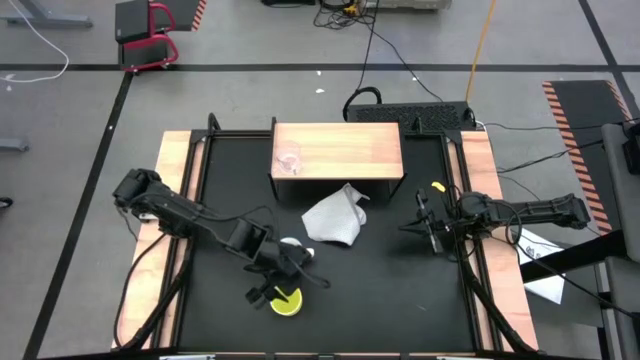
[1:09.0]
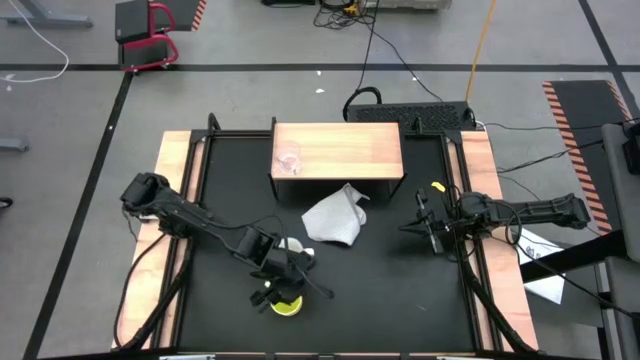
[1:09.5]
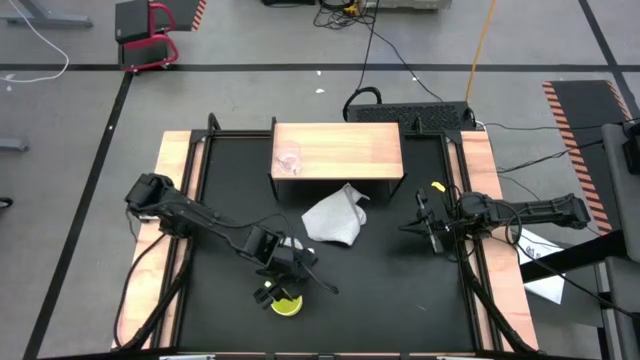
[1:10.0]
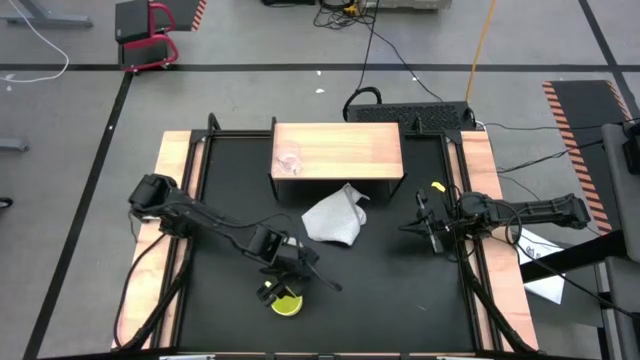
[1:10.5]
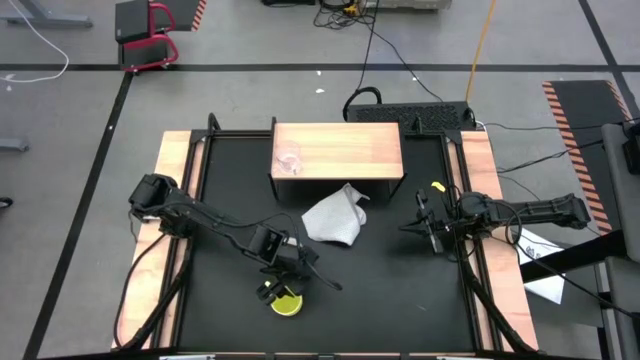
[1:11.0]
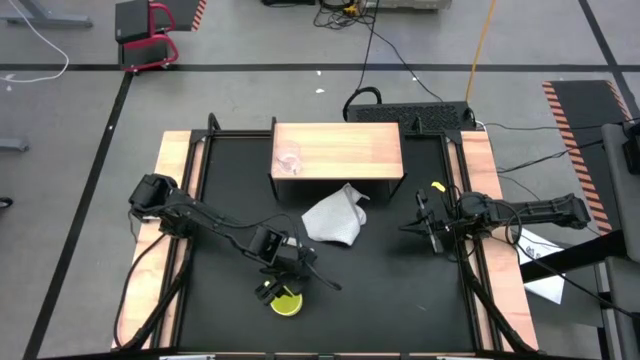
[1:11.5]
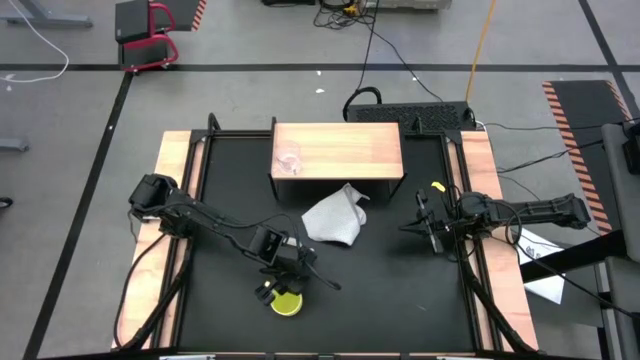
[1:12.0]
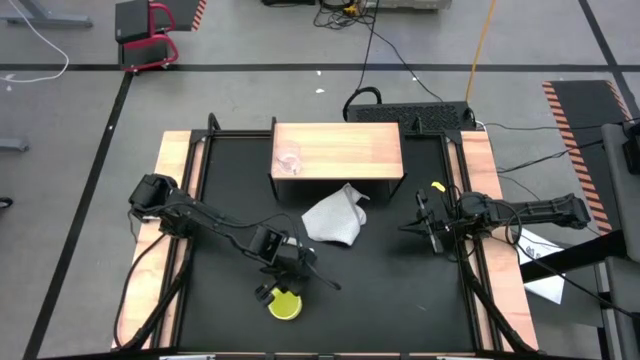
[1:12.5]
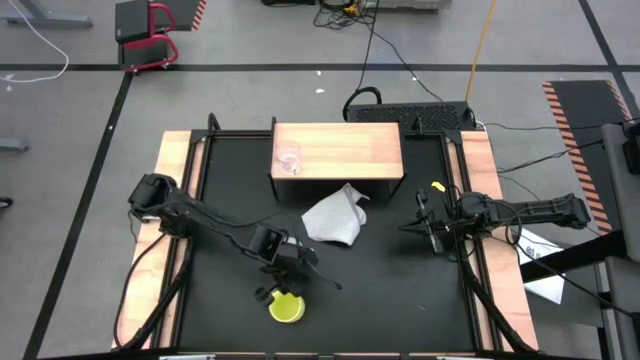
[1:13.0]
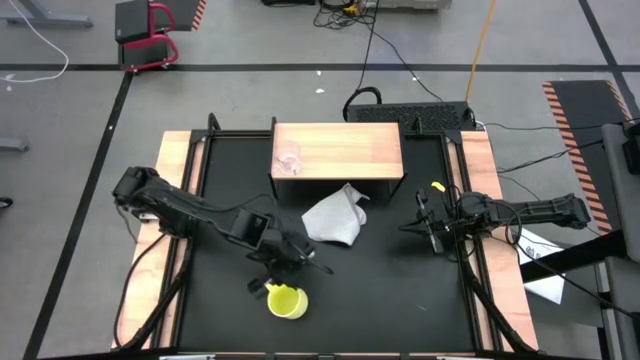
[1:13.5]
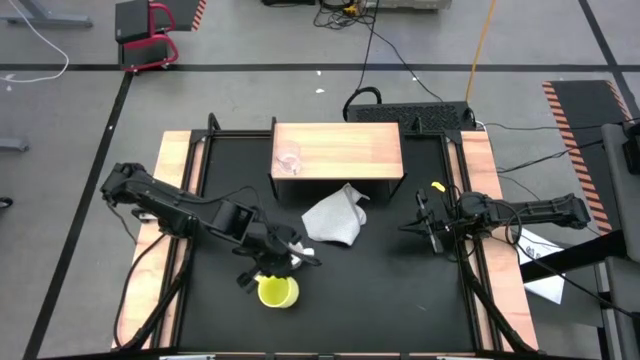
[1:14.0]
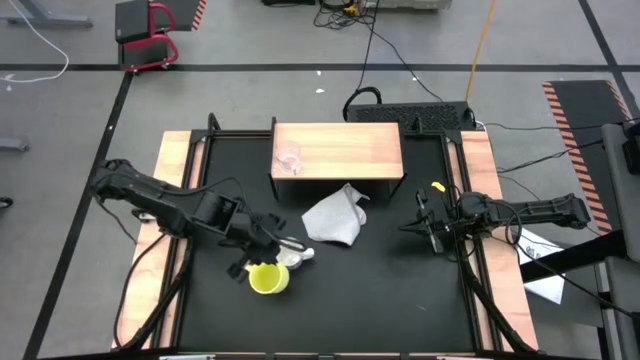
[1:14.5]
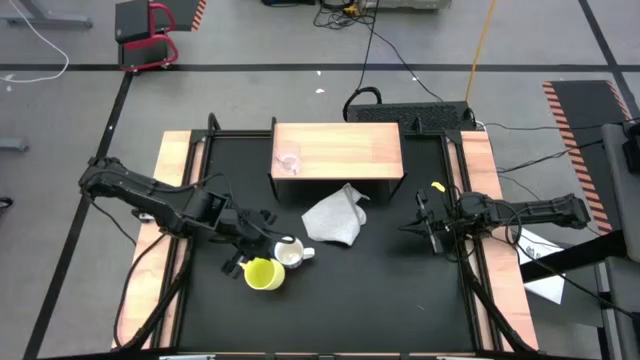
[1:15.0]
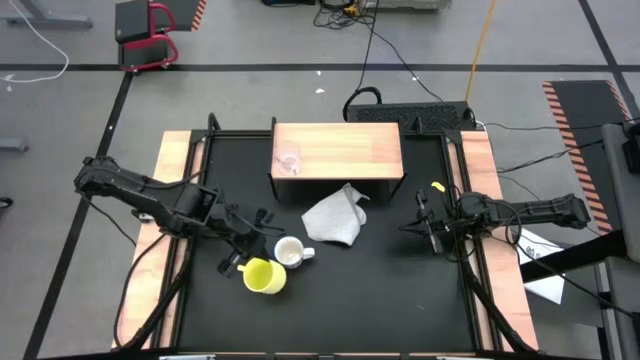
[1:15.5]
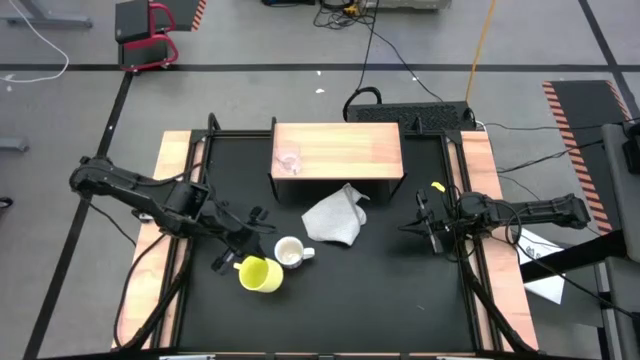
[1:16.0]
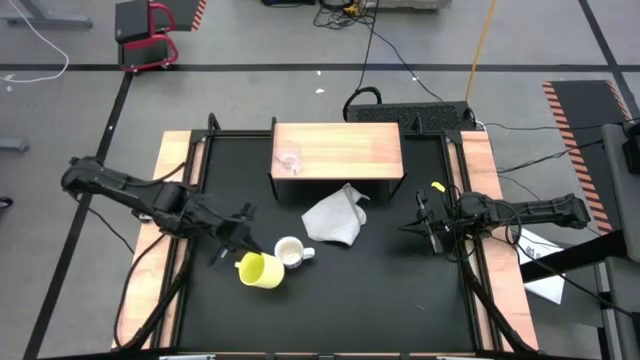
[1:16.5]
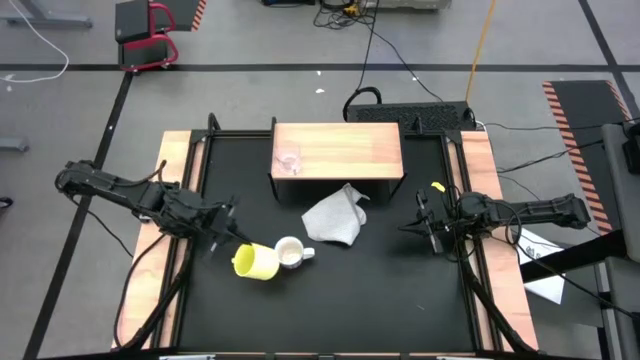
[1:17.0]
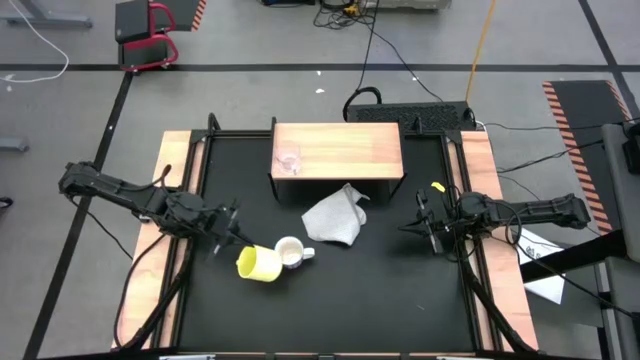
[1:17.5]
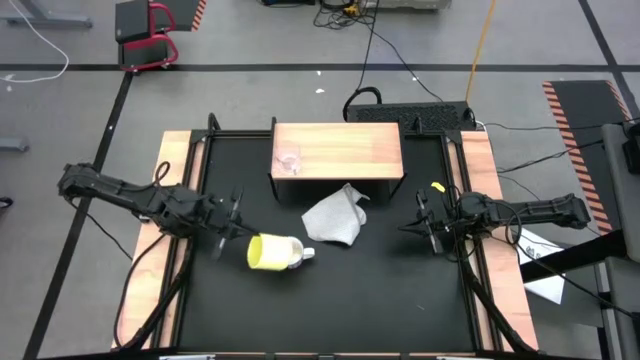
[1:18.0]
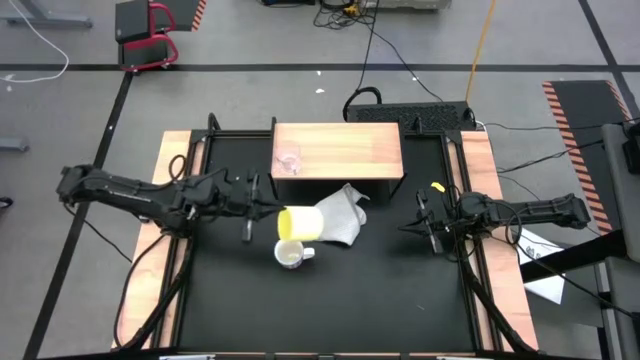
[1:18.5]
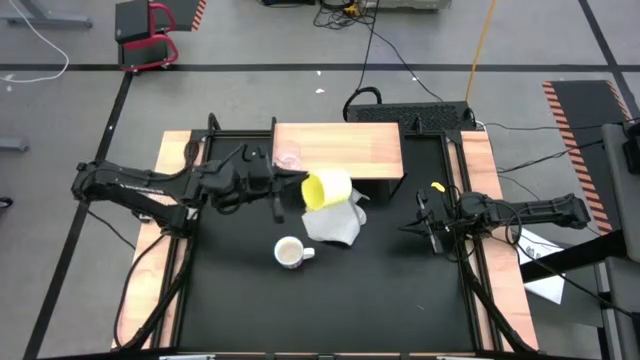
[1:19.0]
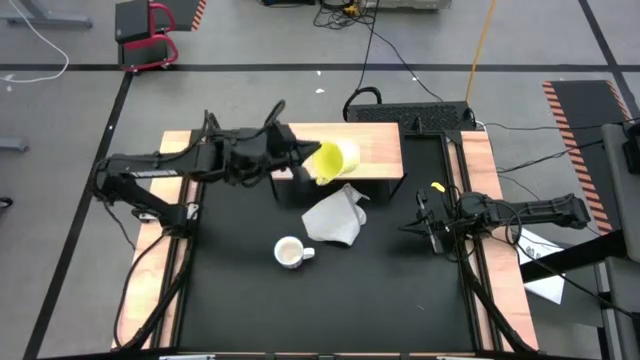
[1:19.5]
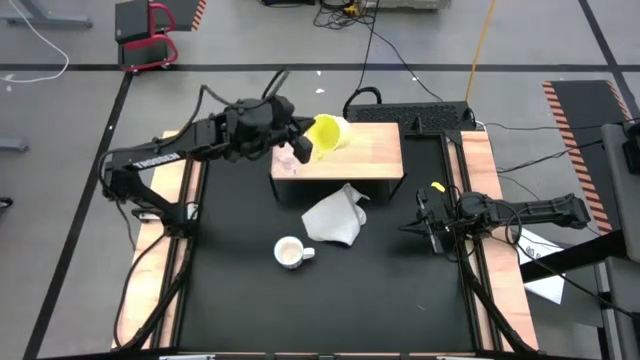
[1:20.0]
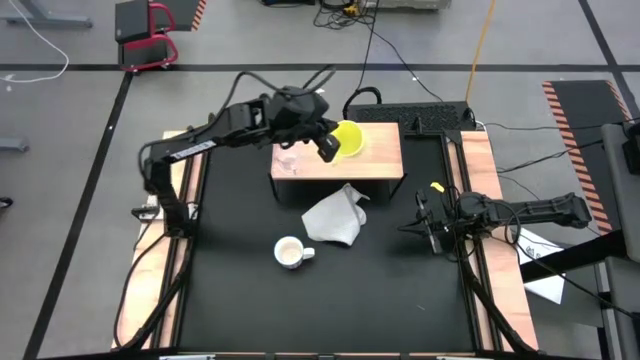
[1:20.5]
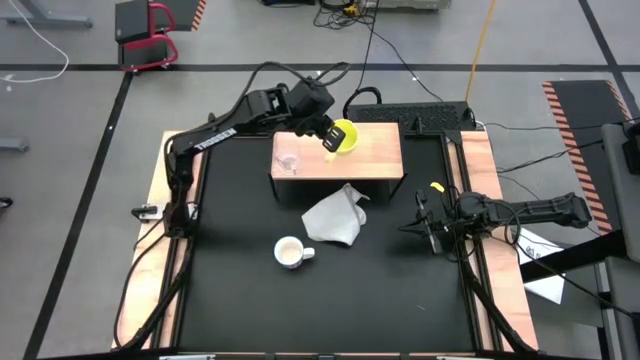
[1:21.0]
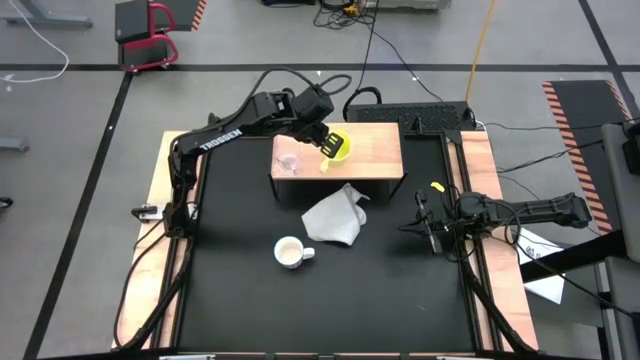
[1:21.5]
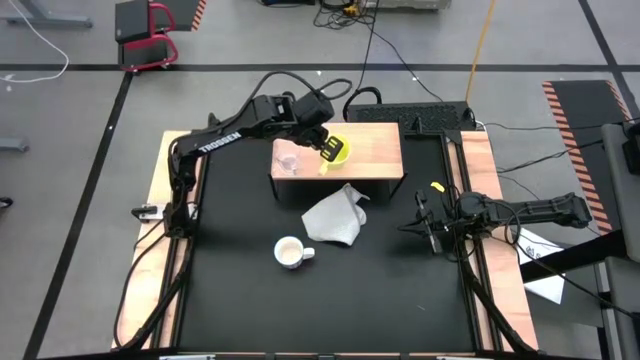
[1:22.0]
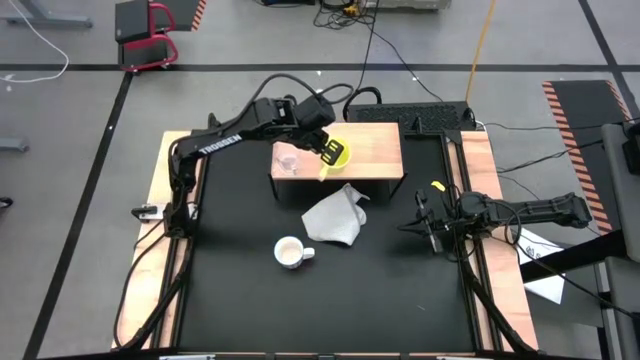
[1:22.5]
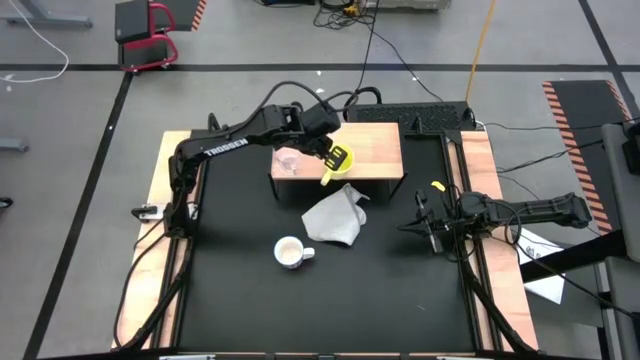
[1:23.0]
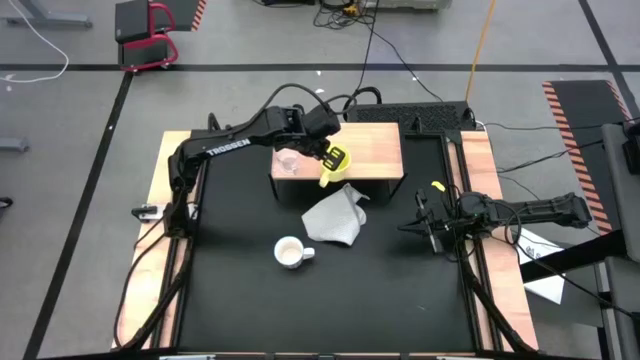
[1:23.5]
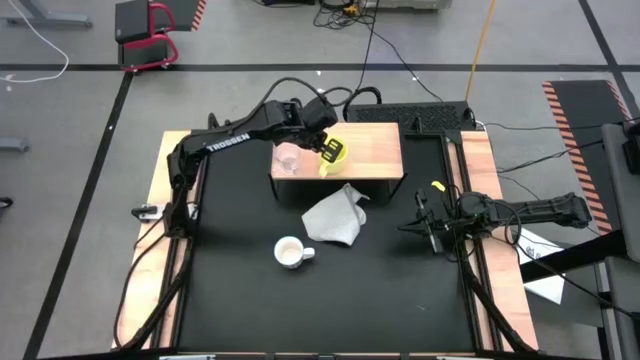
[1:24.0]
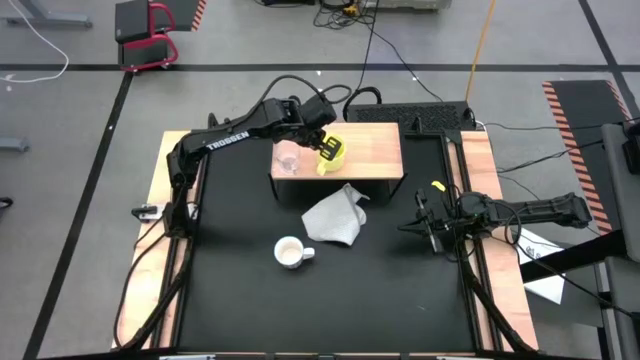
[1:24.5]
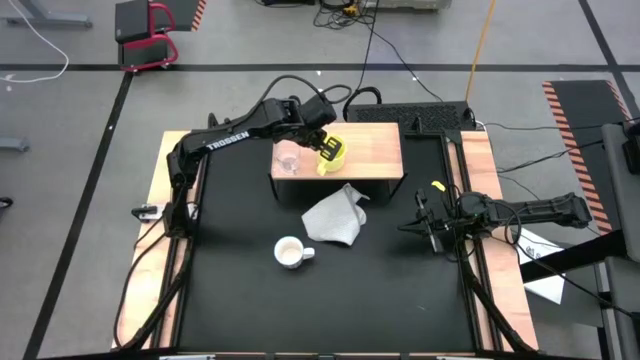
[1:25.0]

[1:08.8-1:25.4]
Task: Stack small to large cups/mugs on shelf
Put the yellow mug on the shelf

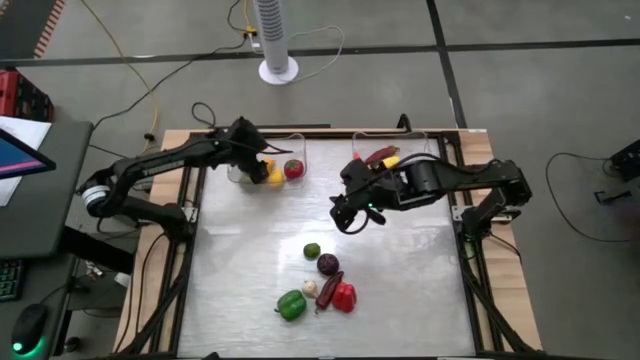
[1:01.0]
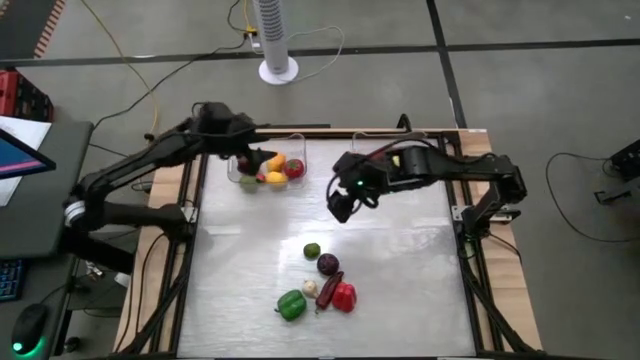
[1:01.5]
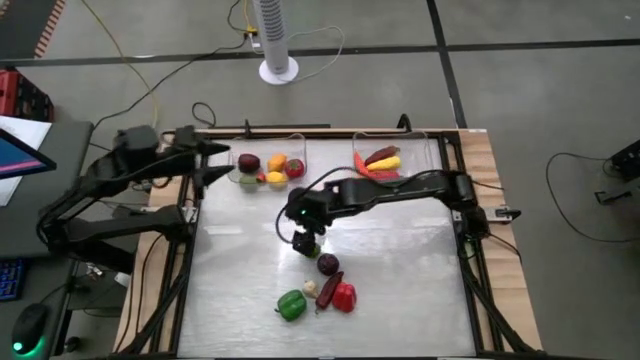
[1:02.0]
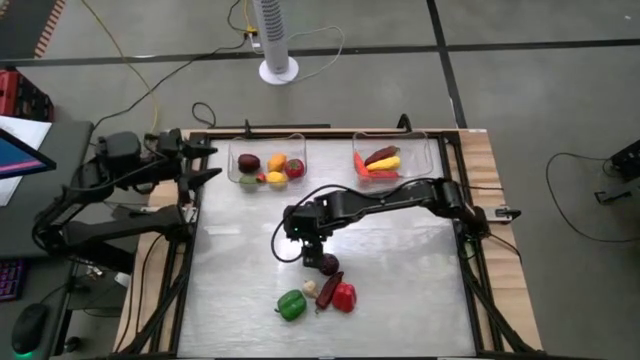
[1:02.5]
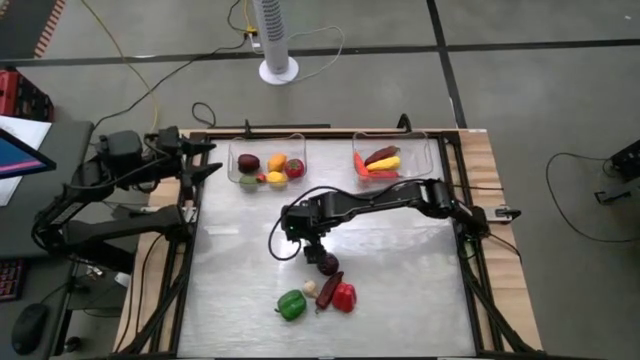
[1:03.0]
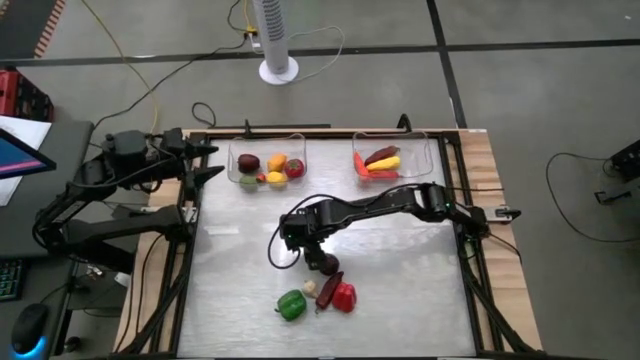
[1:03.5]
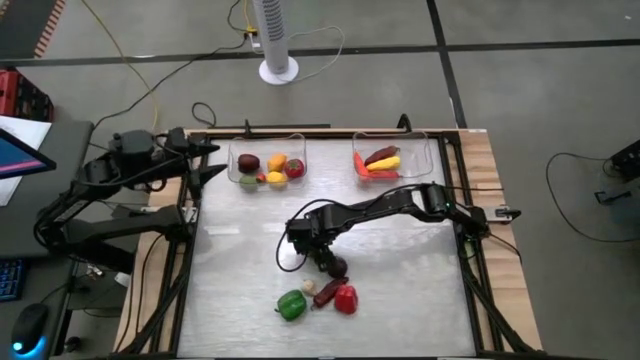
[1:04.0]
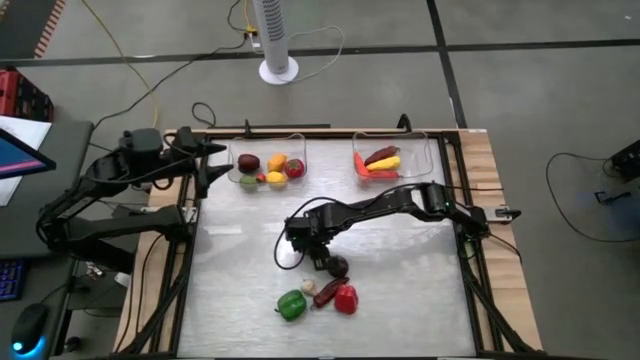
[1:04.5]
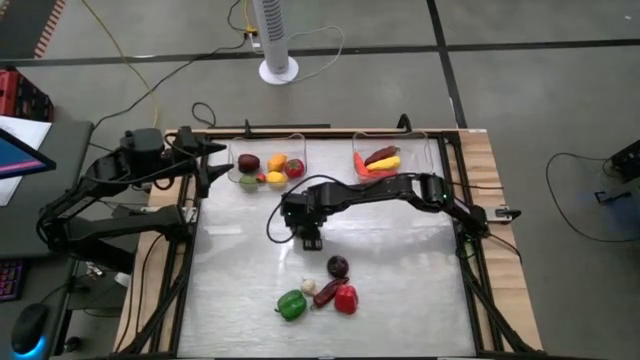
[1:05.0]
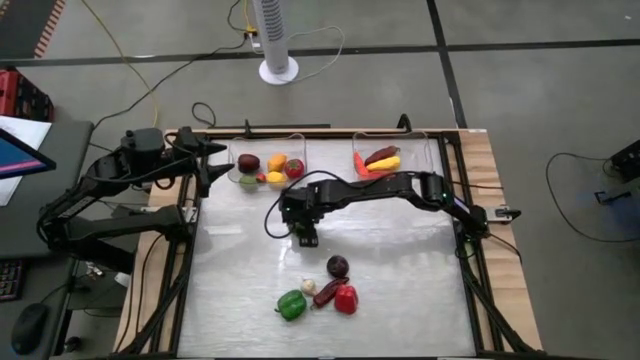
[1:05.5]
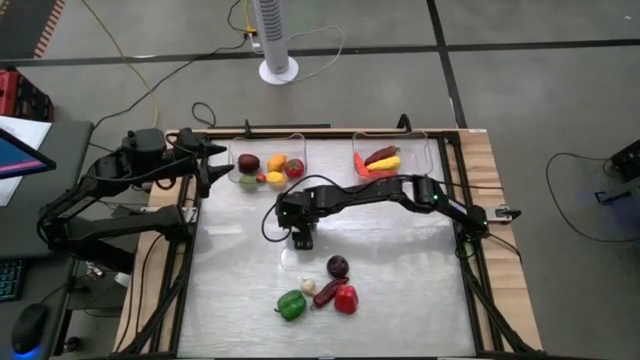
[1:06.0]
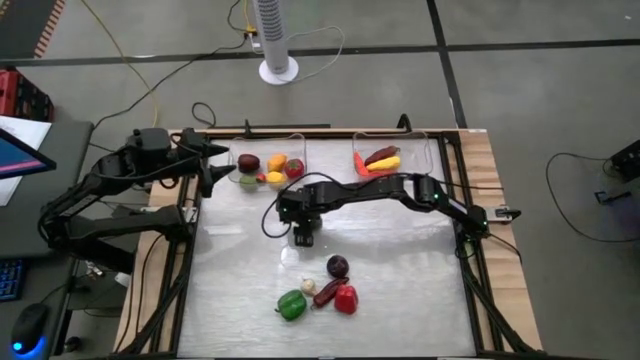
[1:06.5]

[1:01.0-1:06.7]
Task: Sort produce into baskets
Put the green lemon into the left transparent bin
